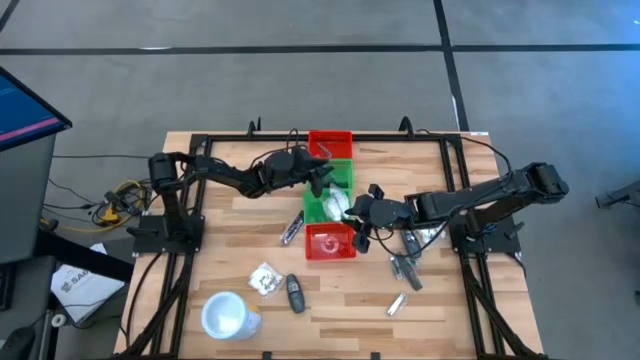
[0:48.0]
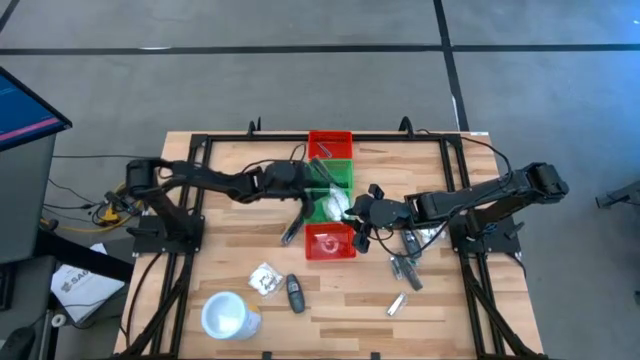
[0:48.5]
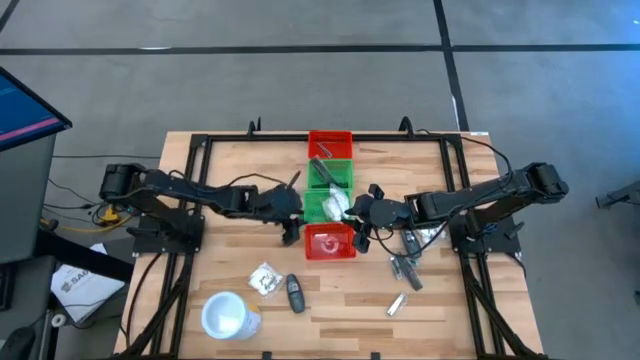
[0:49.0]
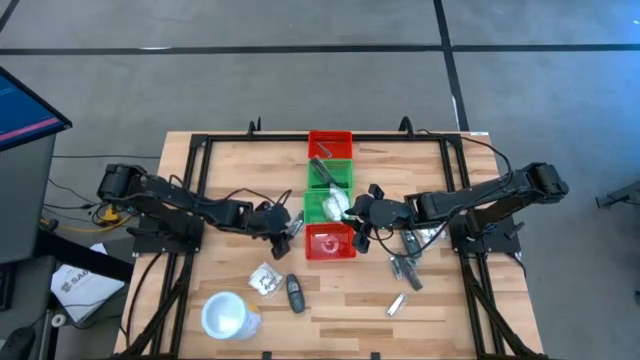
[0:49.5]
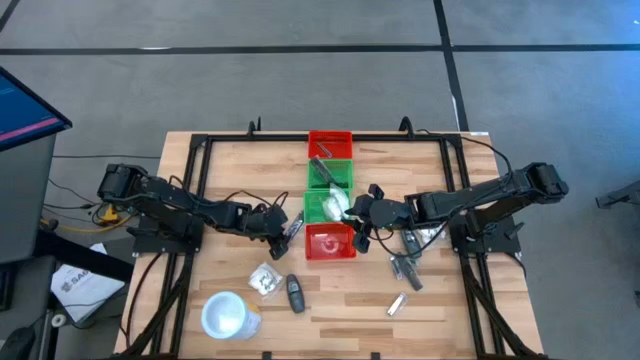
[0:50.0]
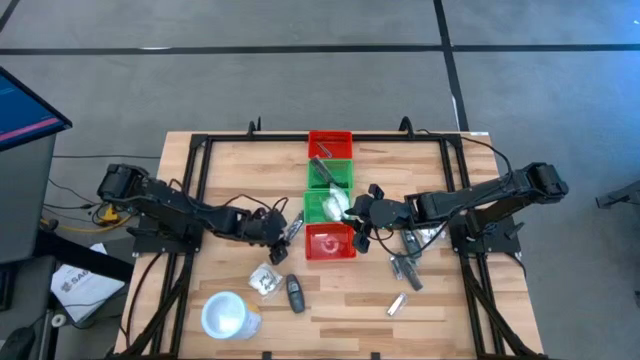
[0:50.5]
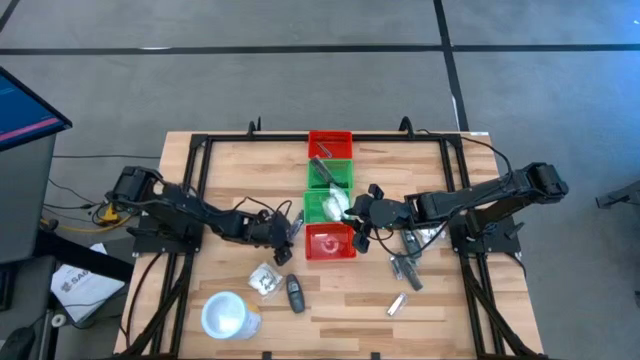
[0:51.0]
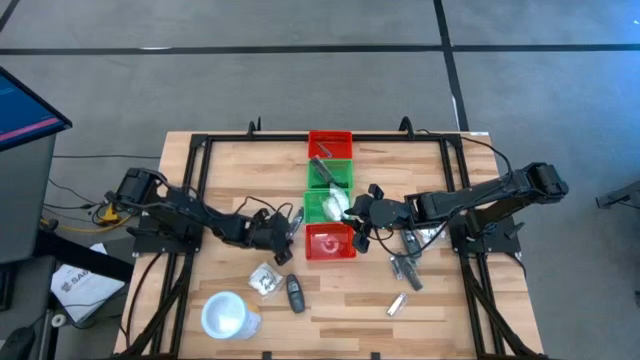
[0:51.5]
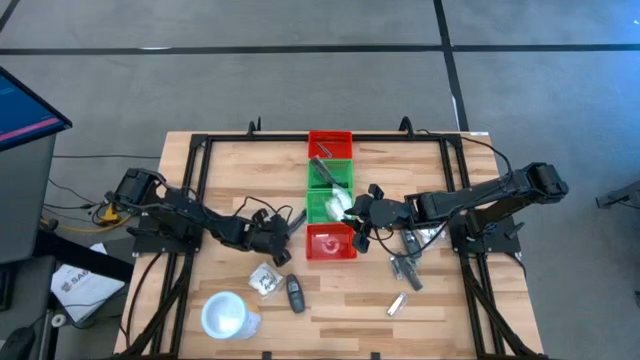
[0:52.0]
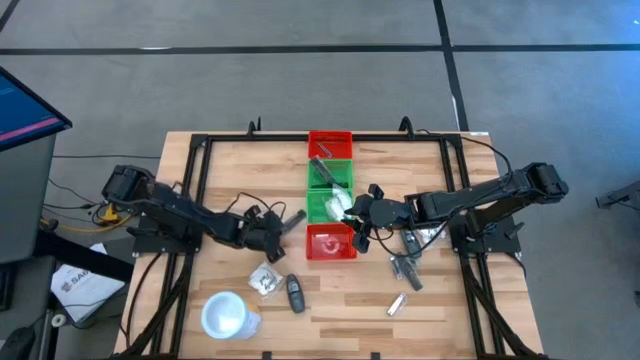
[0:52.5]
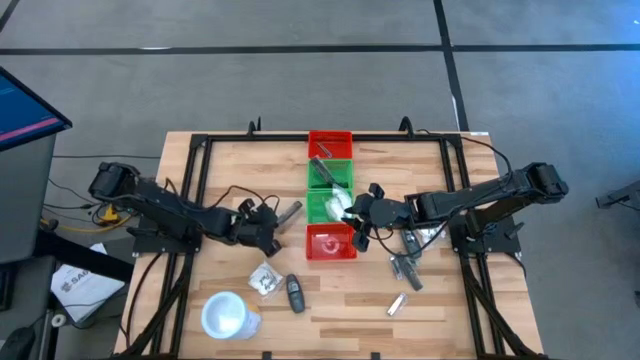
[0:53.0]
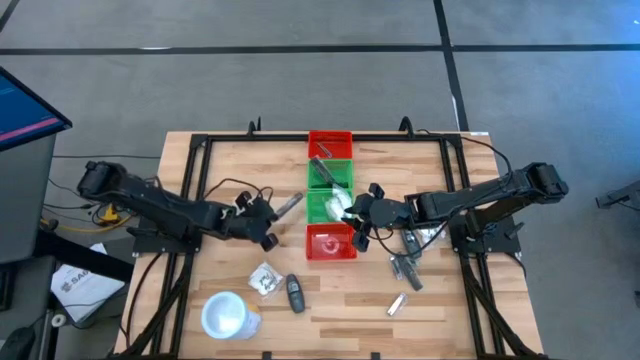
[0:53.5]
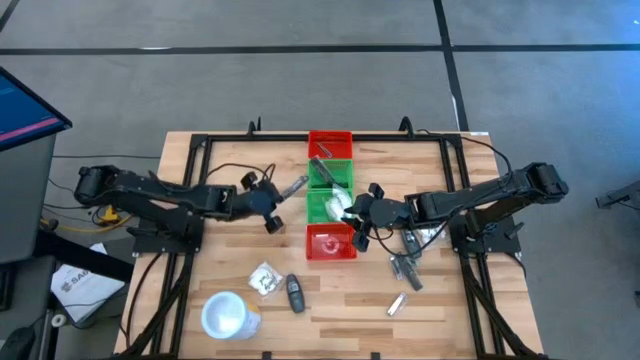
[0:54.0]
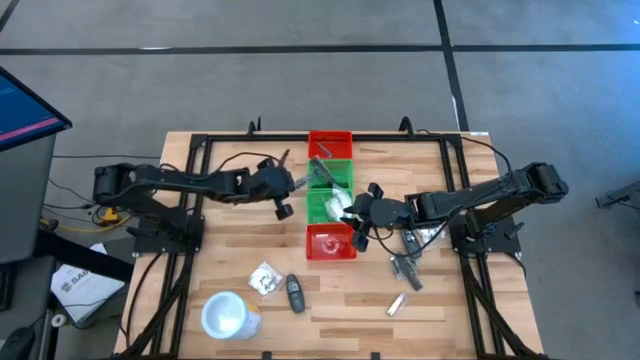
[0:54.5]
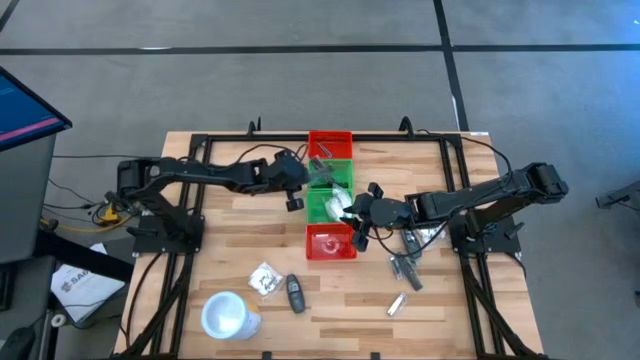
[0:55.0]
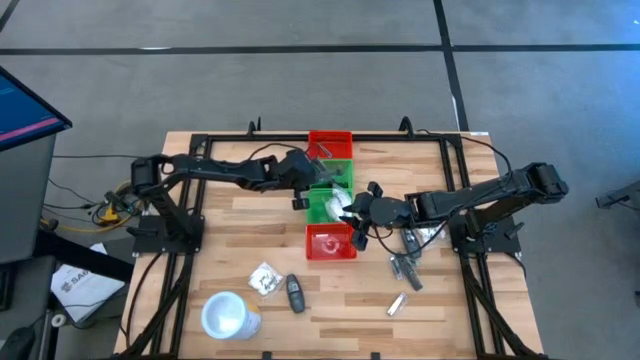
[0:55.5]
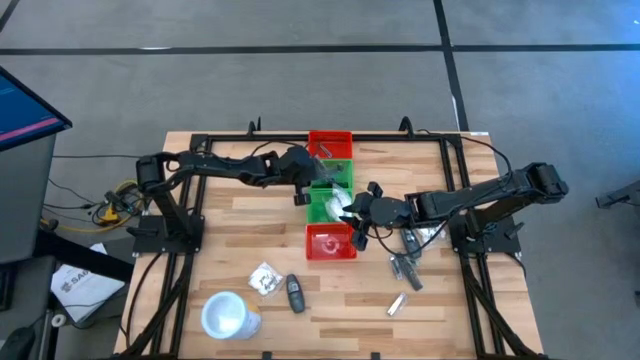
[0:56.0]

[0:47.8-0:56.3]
Task: Pick & Place Travel size toiletries
Put the black comb into the top green bin

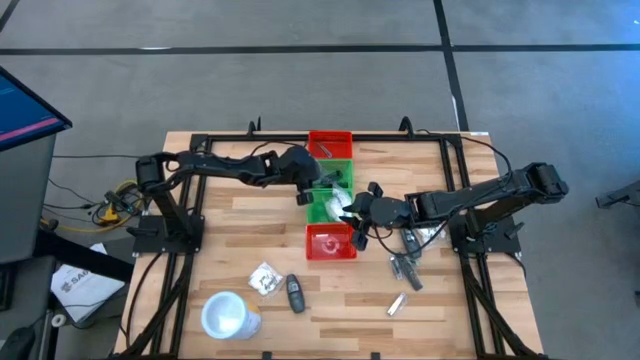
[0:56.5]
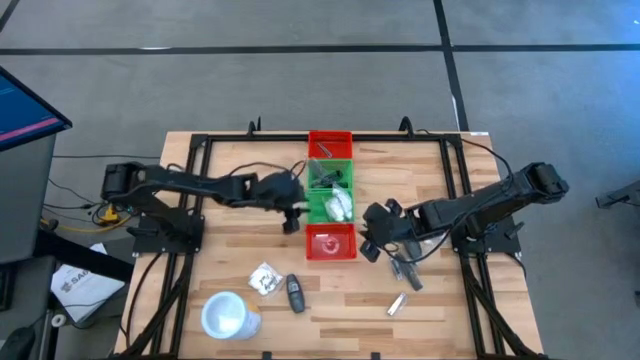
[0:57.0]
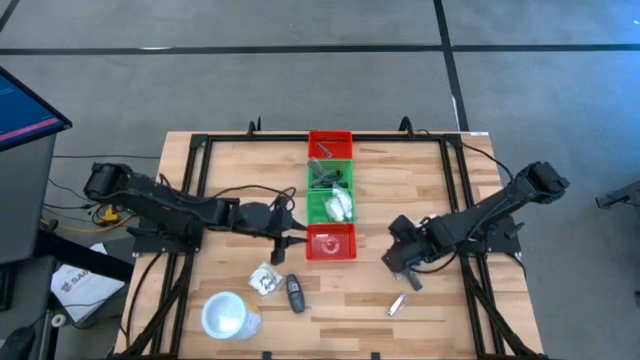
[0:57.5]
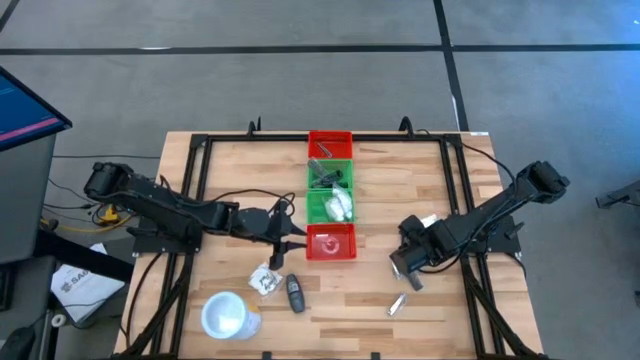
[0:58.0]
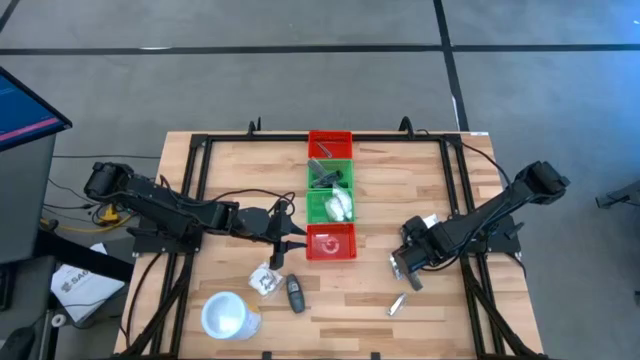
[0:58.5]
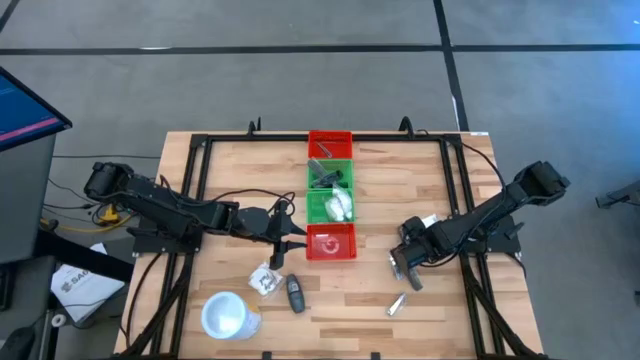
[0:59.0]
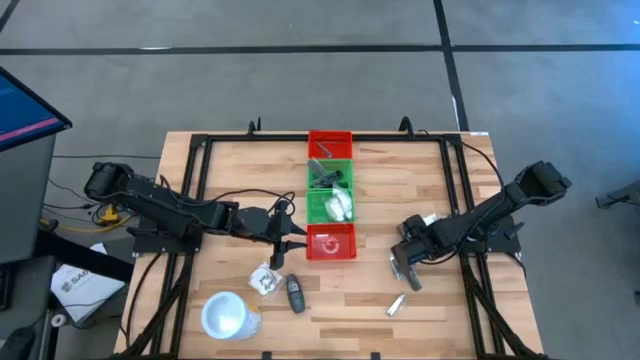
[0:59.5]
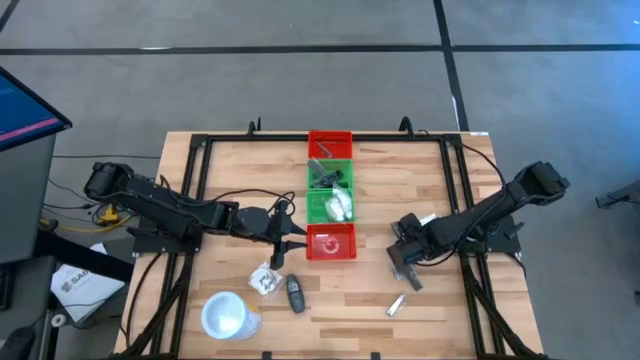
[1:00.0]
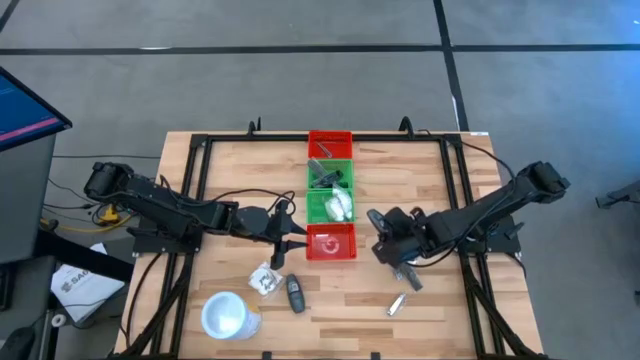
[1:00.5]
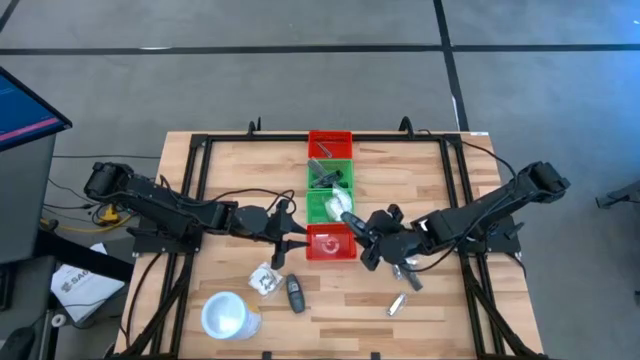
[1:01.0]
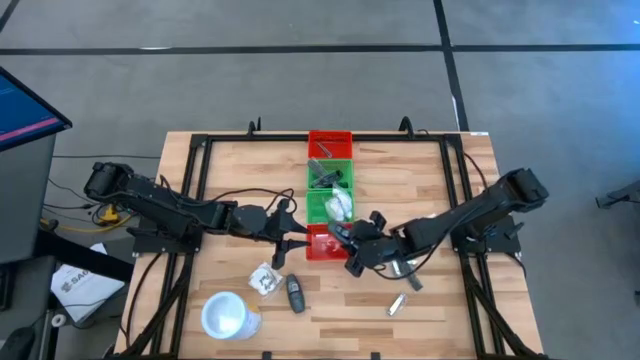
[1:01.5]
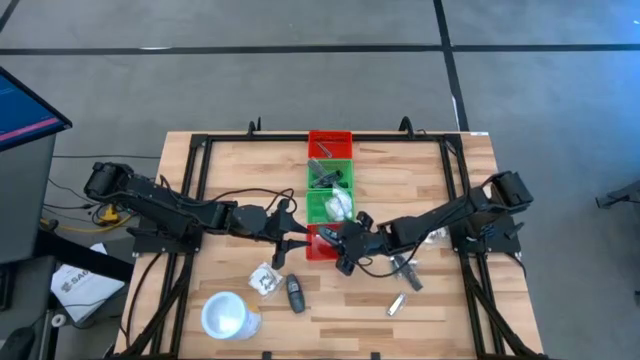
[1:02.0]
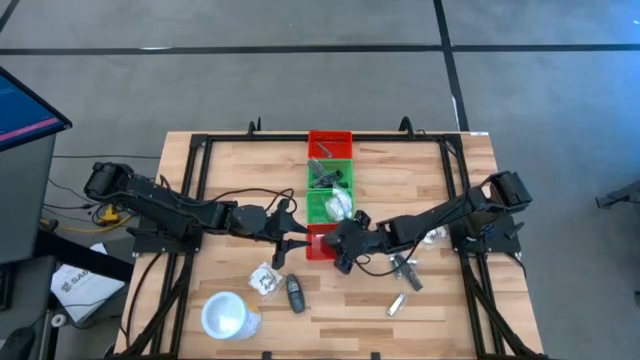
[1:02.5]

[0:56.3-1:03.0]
Put the gray deodorant into the bottom red bin

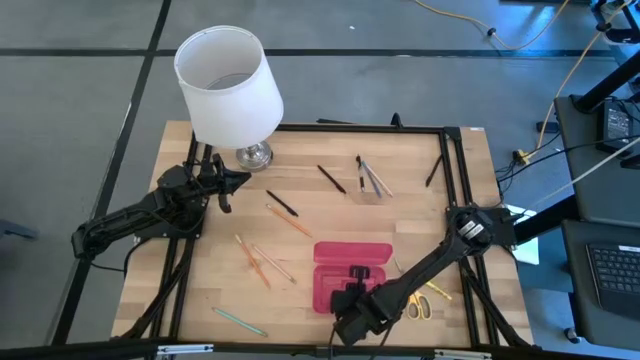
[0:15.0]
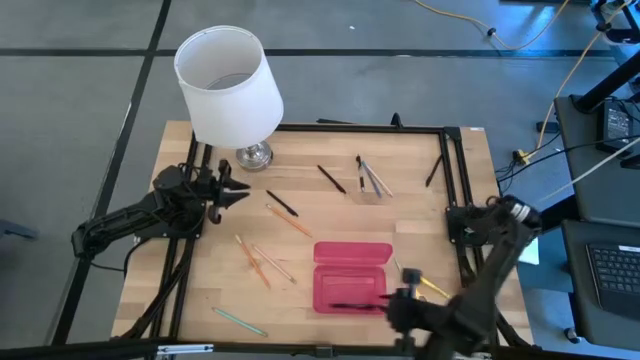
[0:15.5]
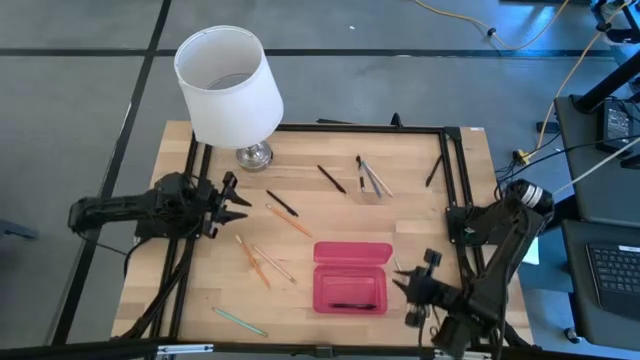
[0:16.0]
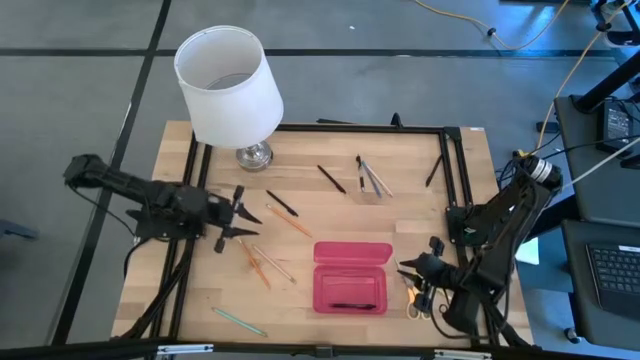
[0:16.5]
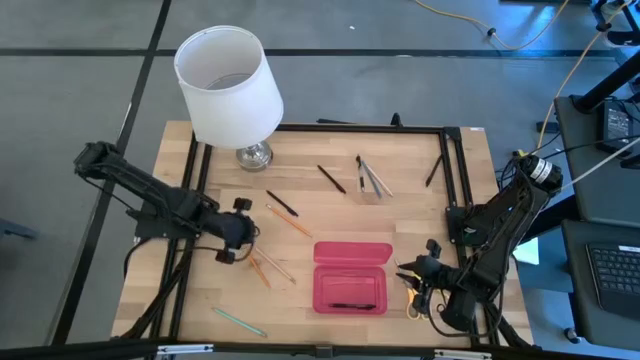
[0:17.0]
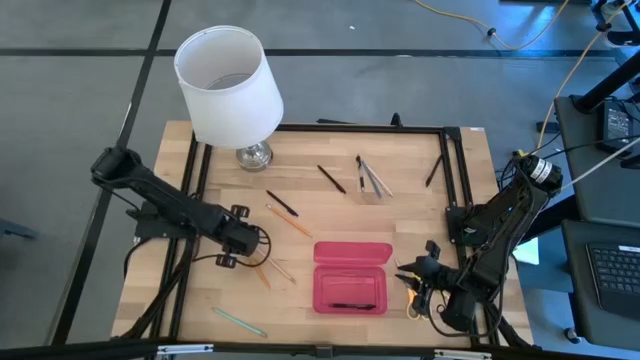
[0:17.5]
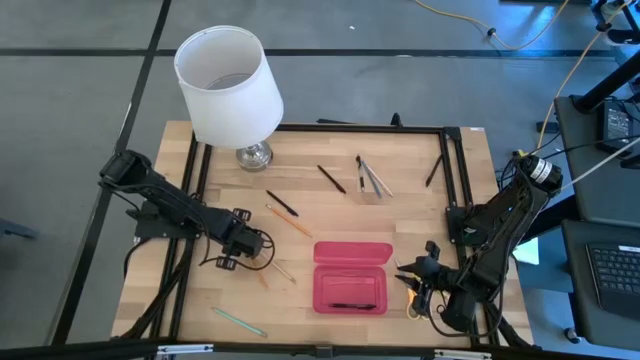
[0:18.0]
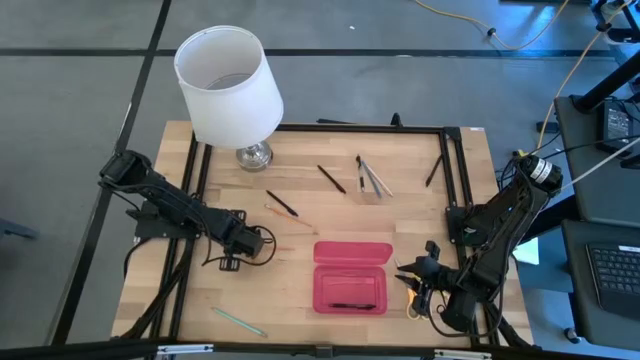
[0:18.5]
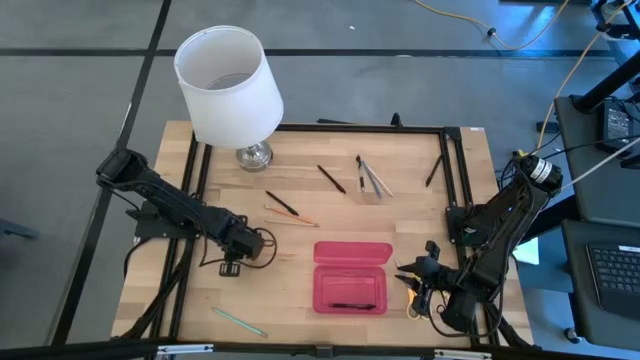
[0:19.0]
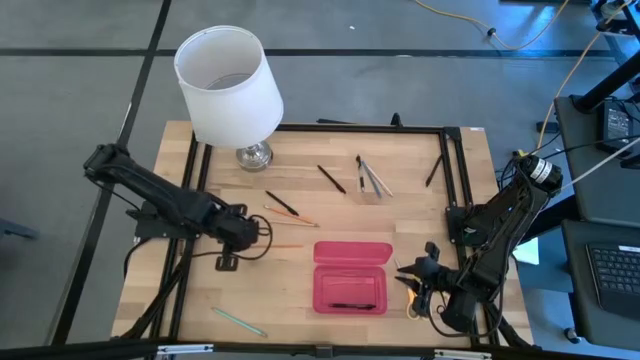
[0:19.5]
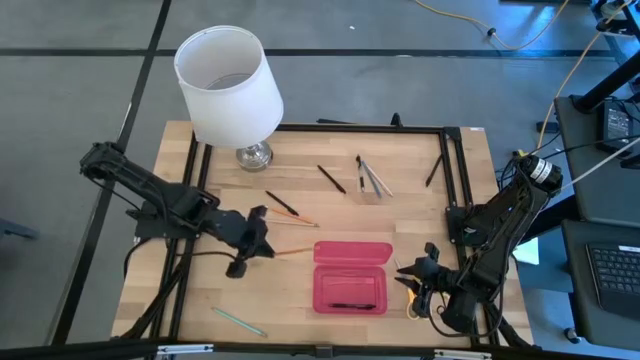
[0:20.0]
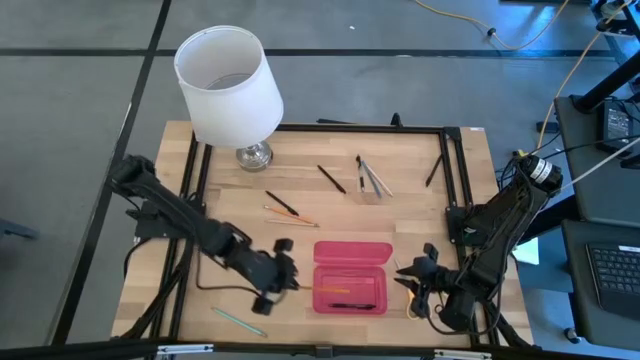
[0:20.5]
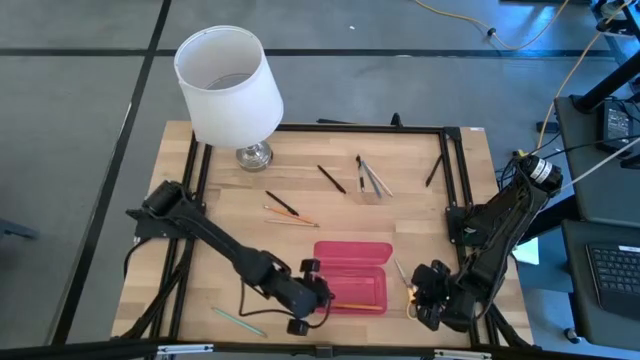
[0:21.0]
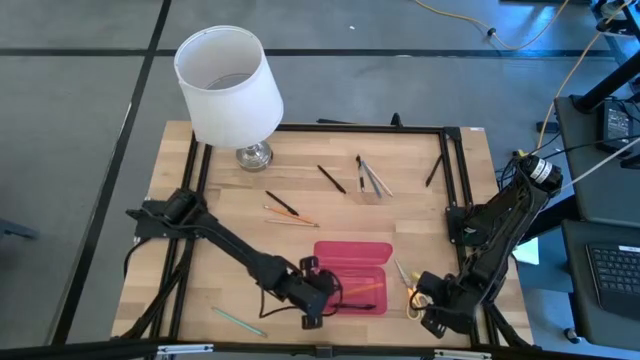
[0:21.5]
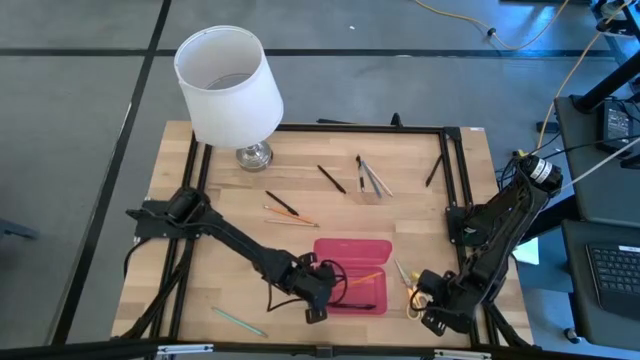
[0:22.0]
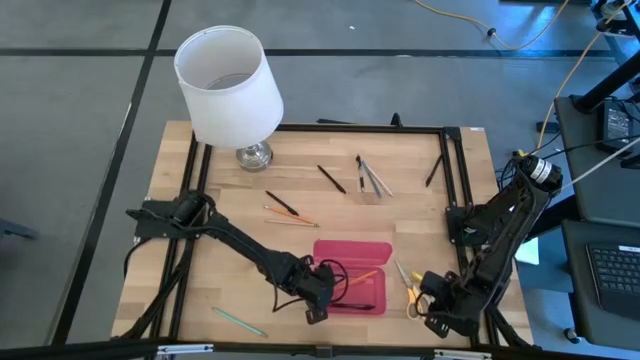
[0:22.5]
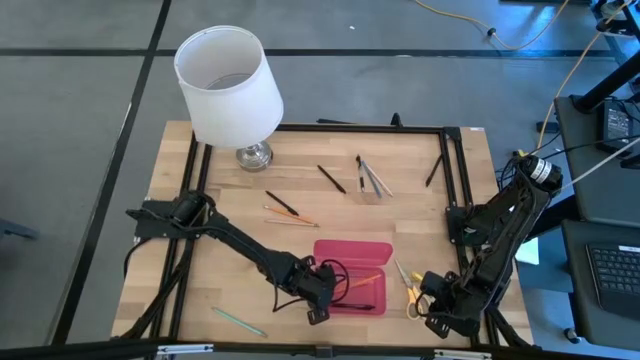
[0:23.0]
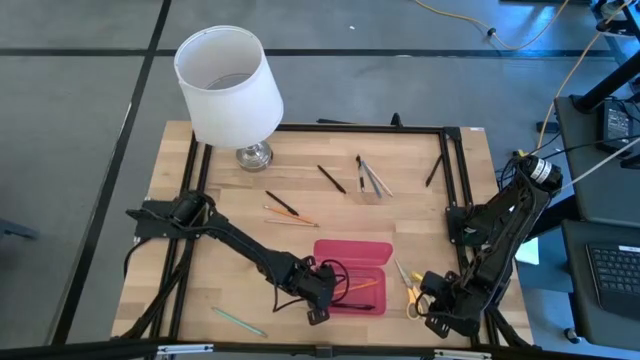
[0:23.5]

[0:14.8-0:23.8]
Task: Pick & place school supplies into a supply box
Put the yellow supply into the pink supply box
